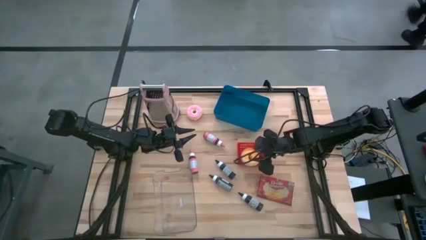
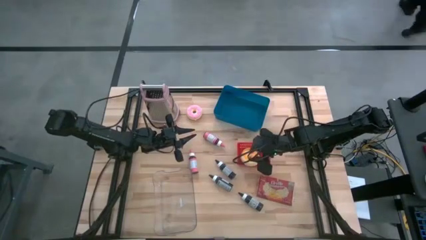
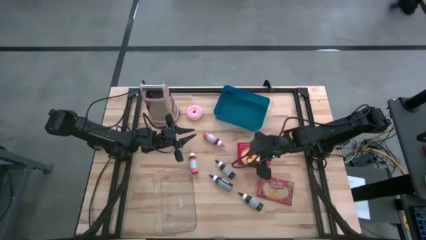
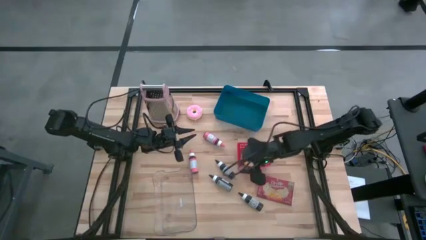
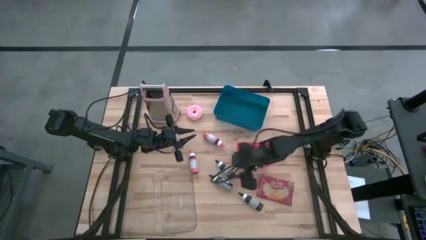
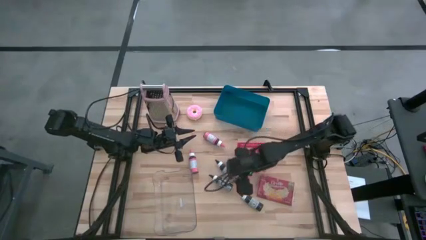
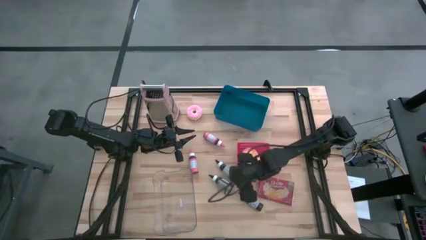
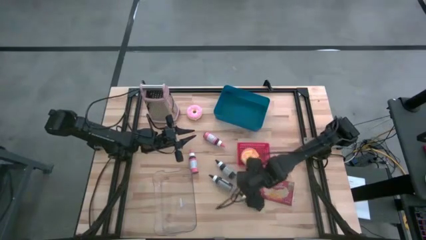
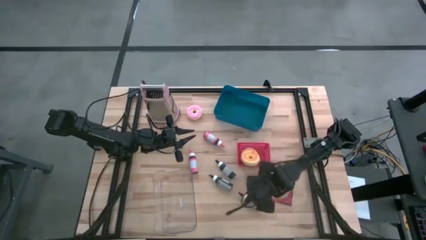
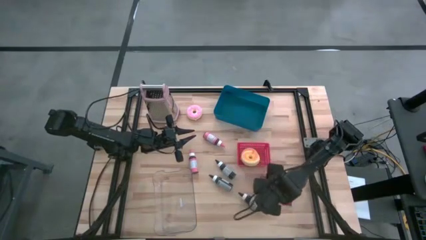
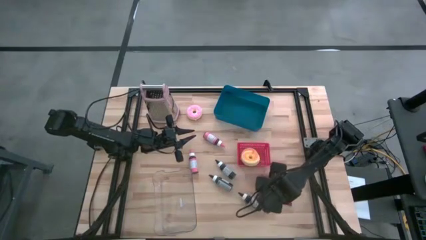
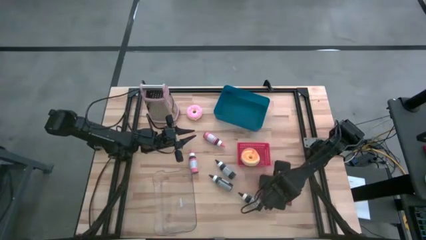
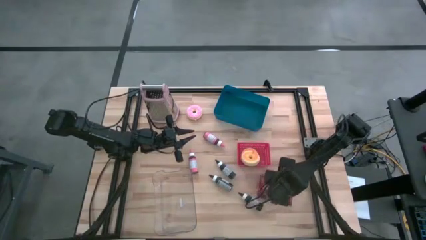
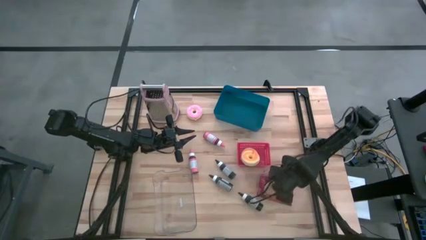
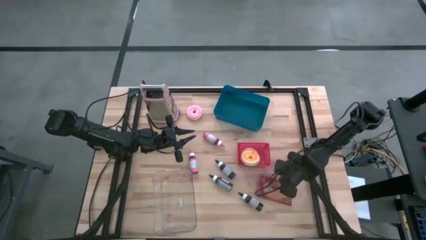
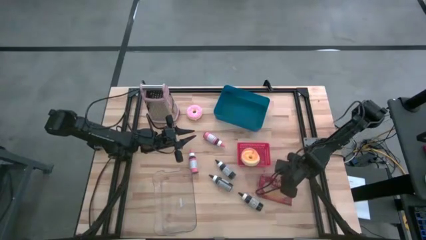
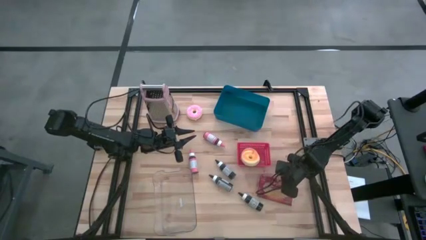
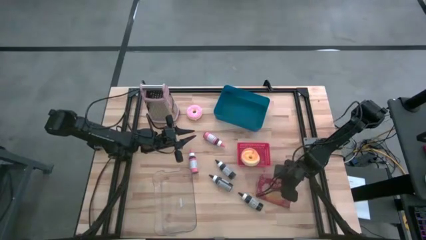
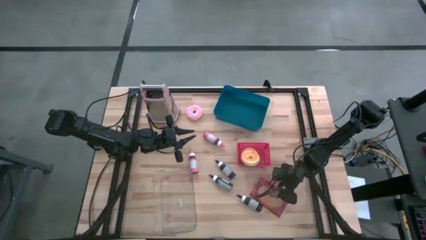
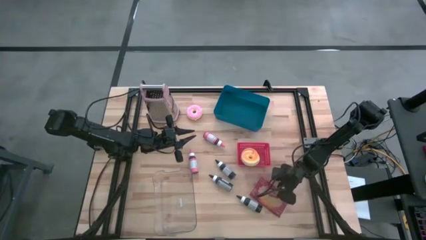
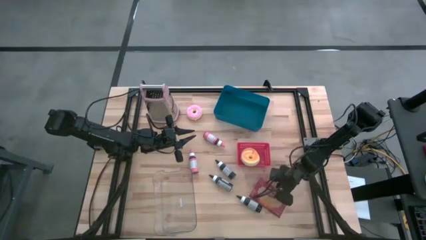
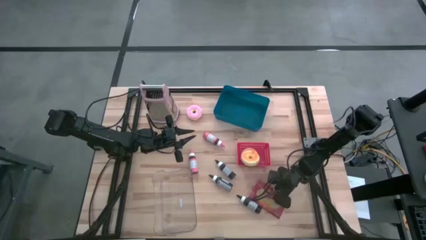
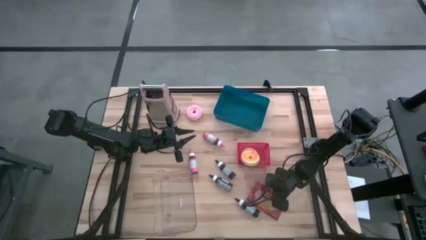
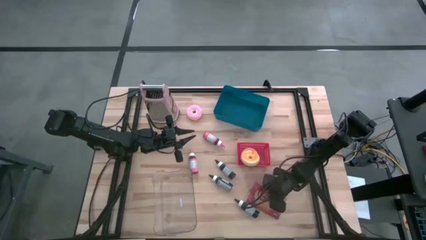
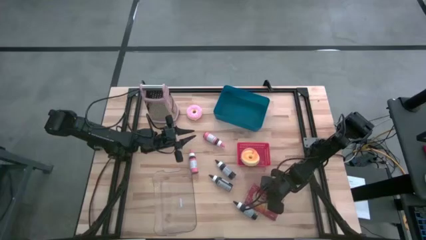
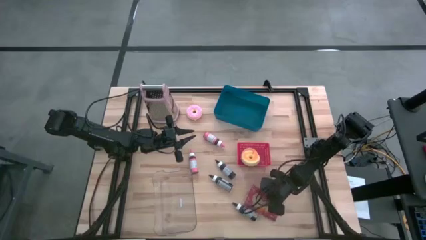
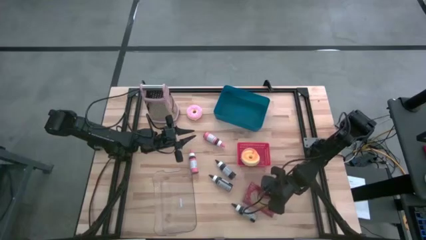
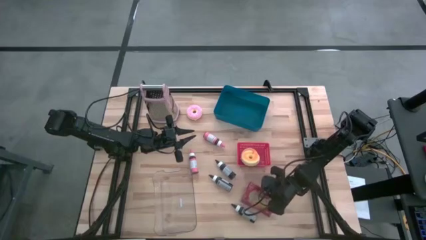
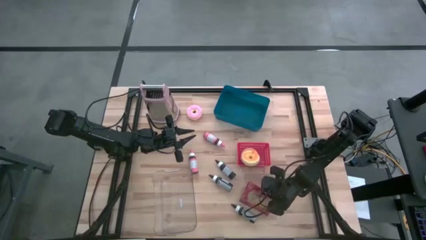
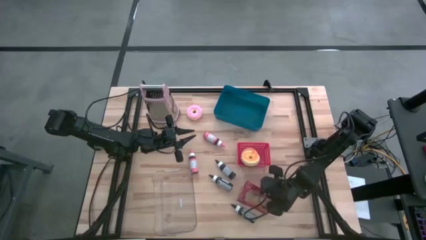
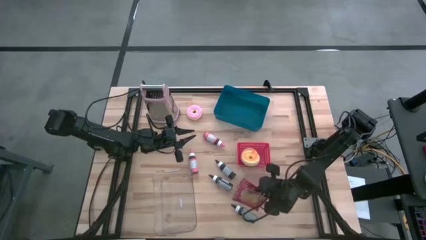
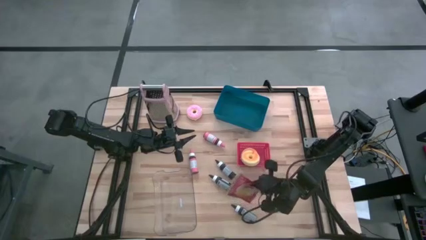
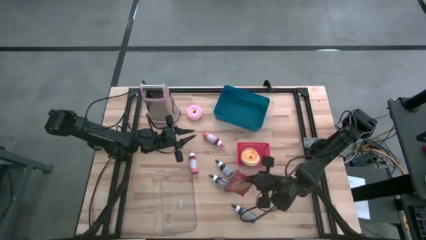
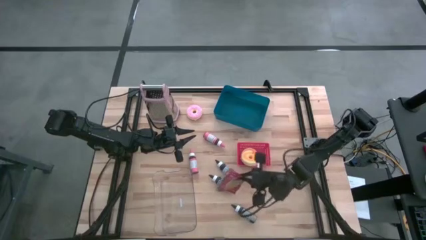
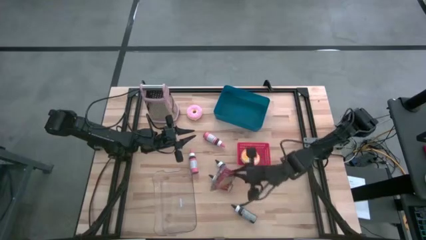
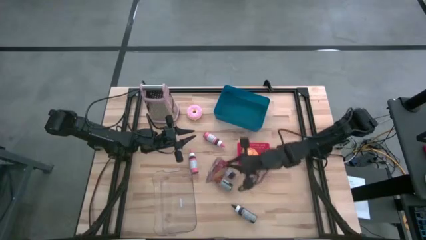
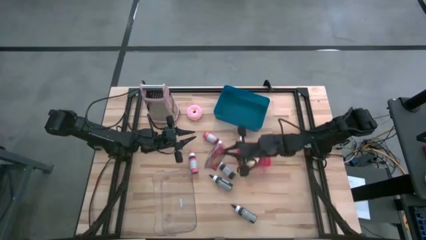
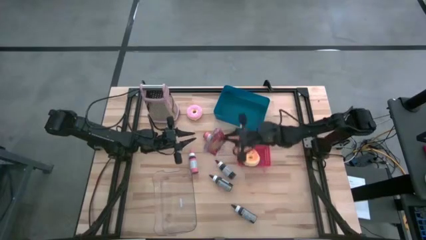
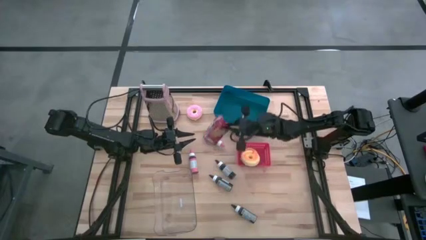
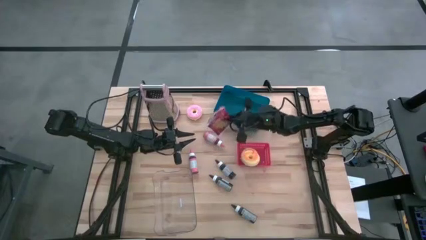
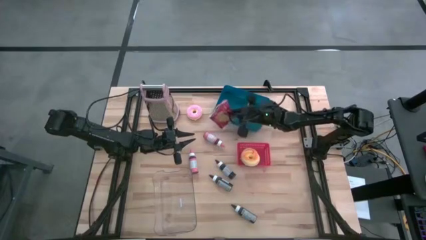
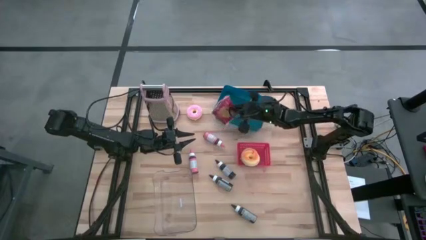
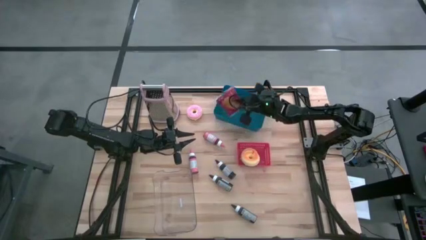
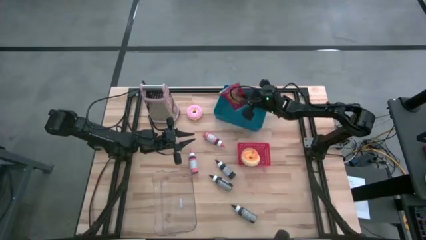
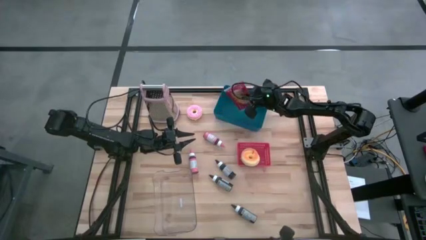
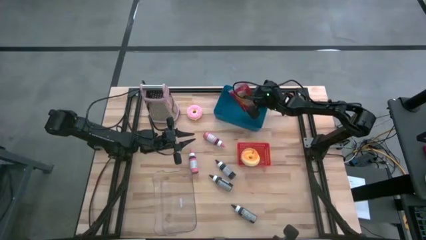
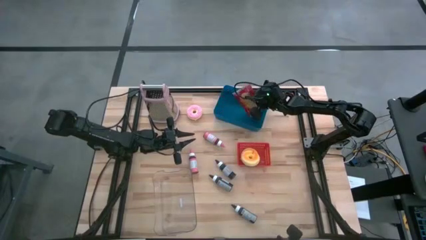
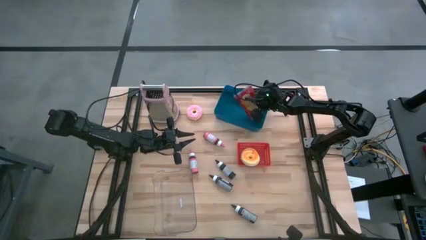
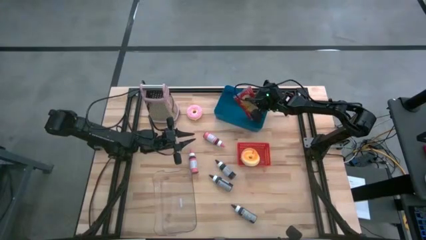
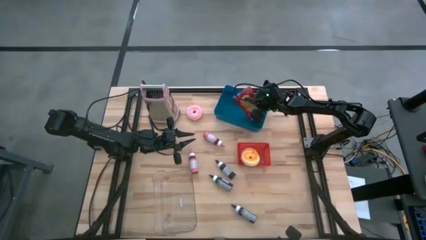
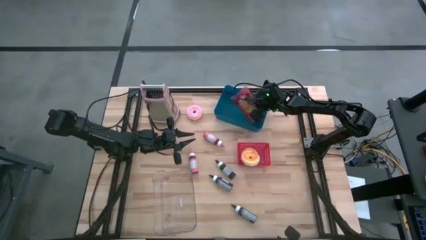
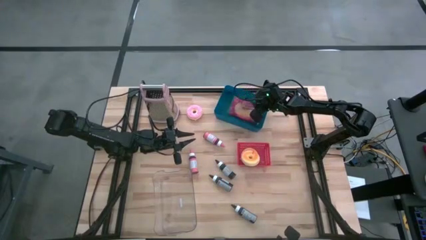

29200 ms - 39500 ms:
Task: Pick & Place Food Item
Put the red popcorn bag into the blue bin
